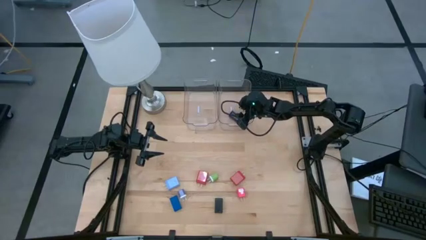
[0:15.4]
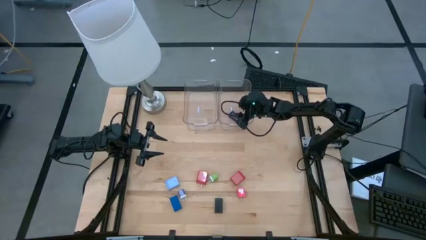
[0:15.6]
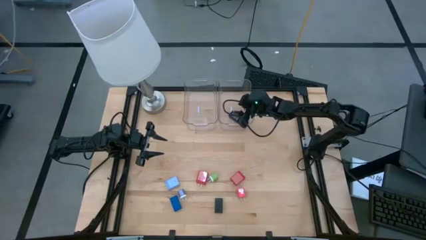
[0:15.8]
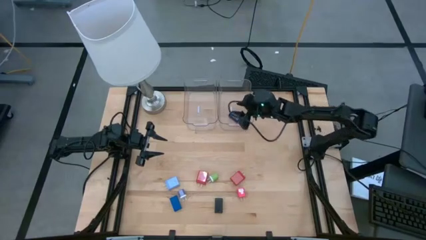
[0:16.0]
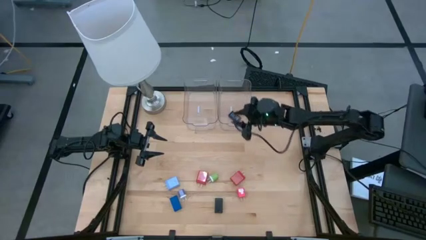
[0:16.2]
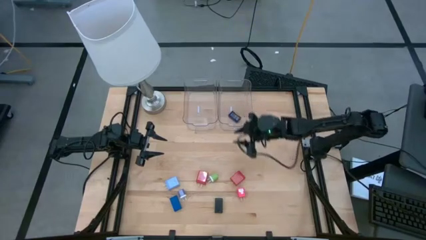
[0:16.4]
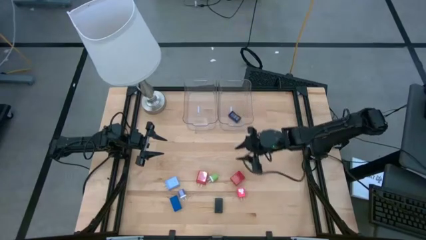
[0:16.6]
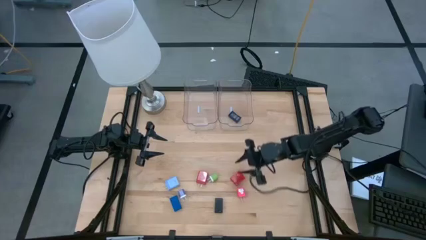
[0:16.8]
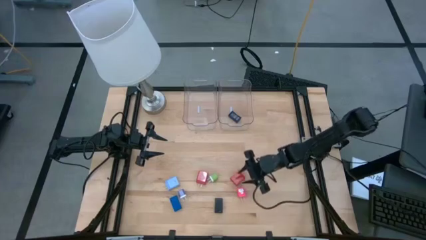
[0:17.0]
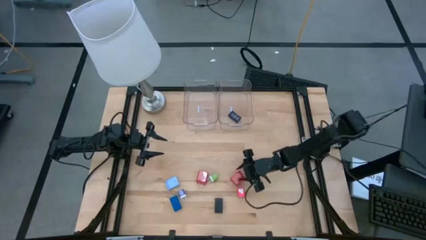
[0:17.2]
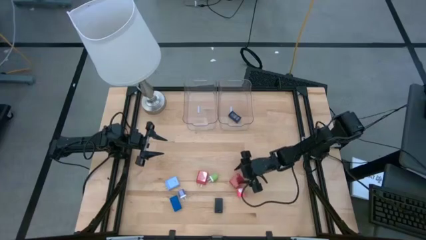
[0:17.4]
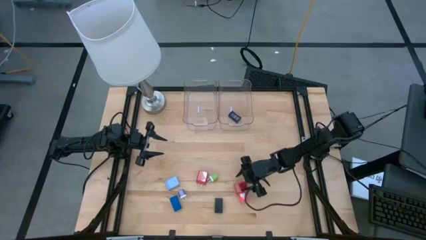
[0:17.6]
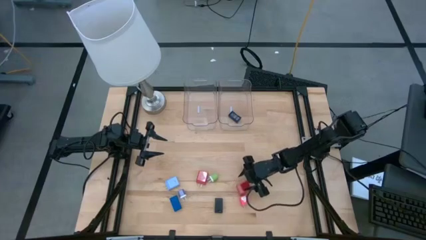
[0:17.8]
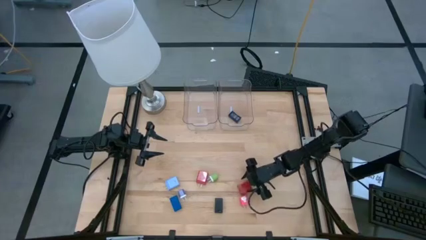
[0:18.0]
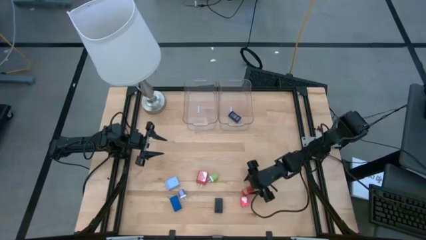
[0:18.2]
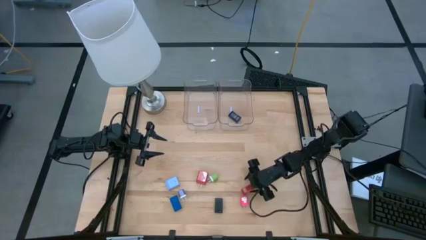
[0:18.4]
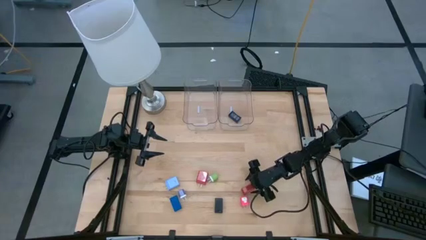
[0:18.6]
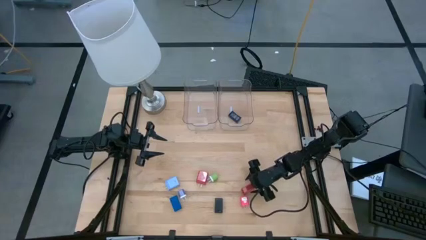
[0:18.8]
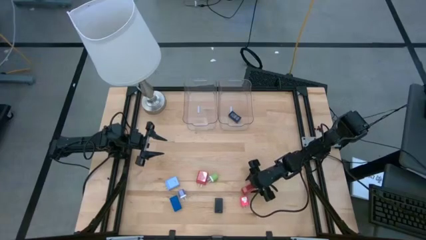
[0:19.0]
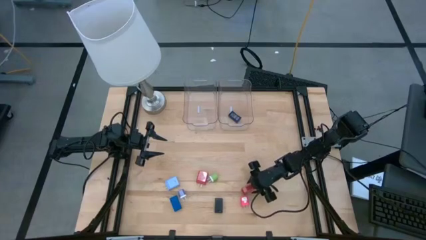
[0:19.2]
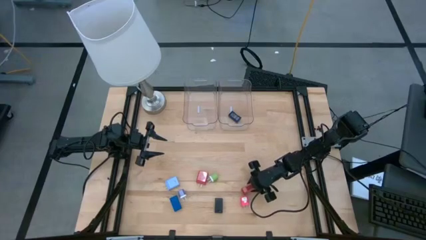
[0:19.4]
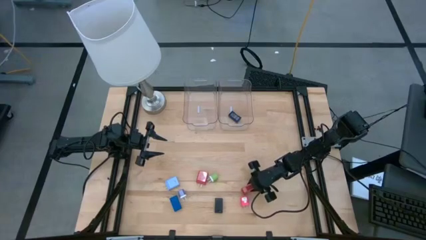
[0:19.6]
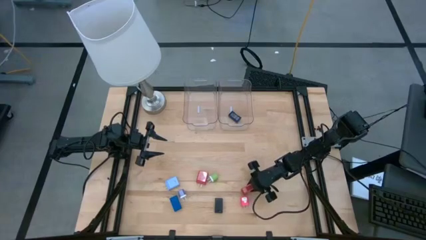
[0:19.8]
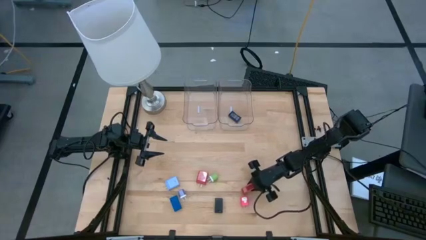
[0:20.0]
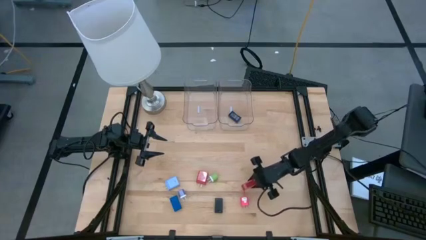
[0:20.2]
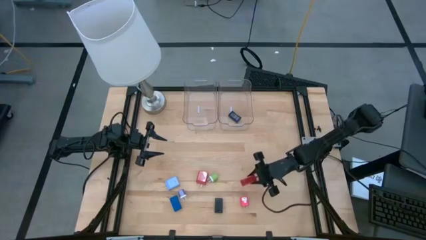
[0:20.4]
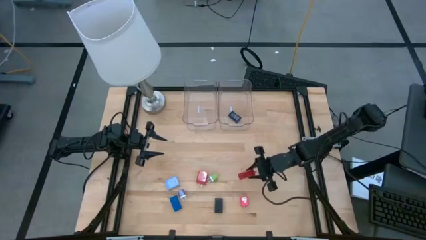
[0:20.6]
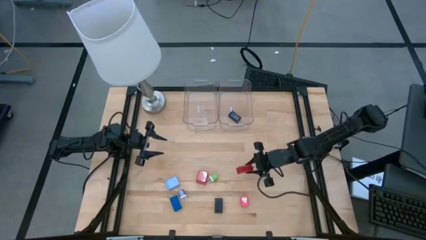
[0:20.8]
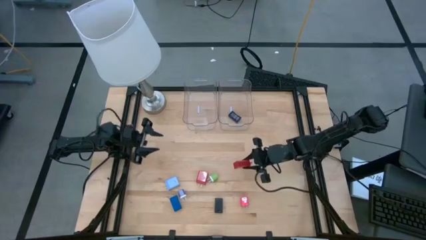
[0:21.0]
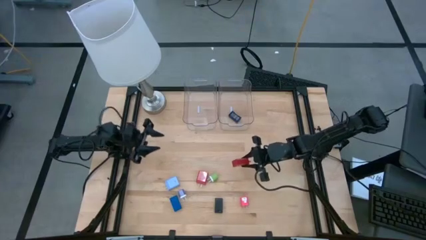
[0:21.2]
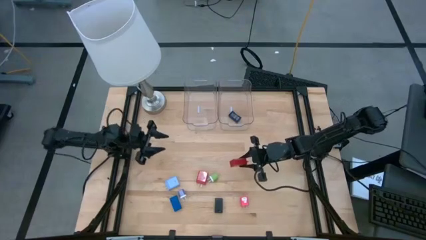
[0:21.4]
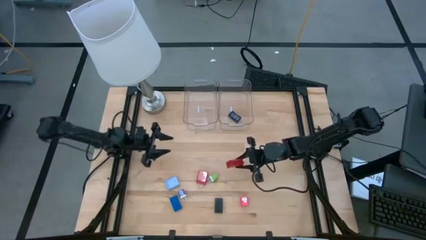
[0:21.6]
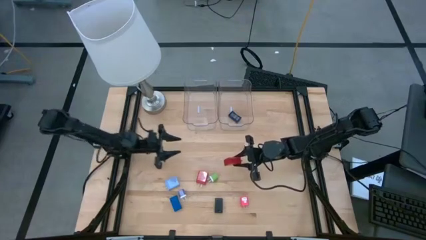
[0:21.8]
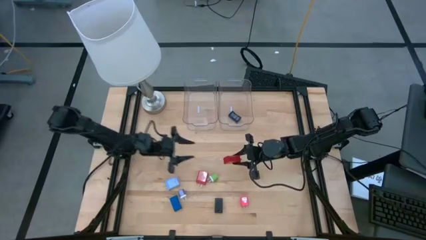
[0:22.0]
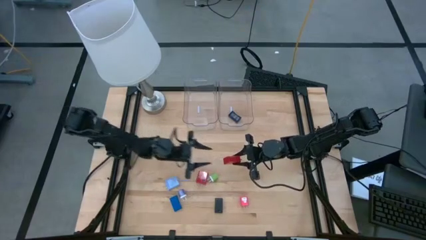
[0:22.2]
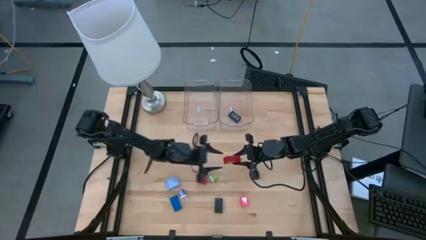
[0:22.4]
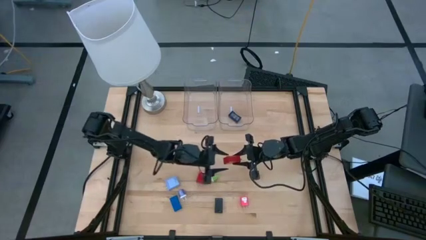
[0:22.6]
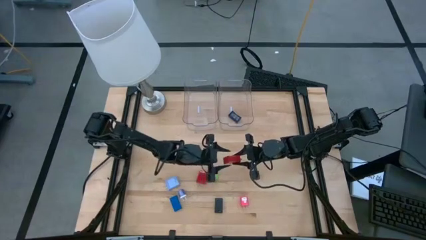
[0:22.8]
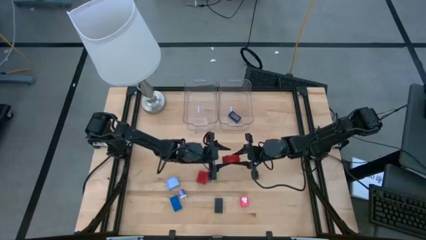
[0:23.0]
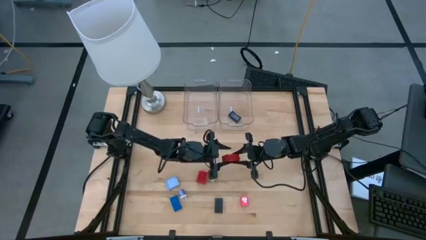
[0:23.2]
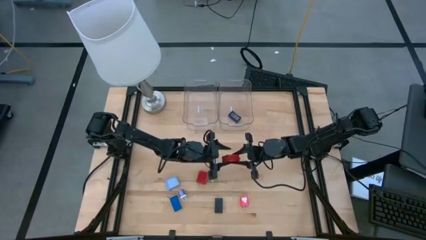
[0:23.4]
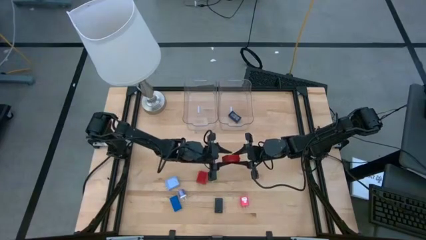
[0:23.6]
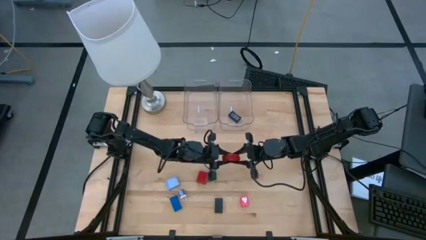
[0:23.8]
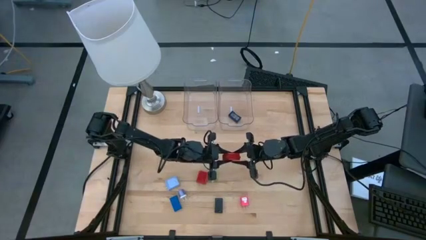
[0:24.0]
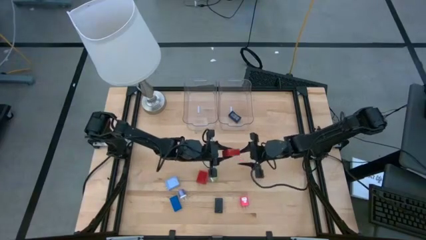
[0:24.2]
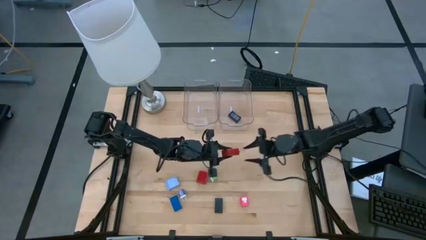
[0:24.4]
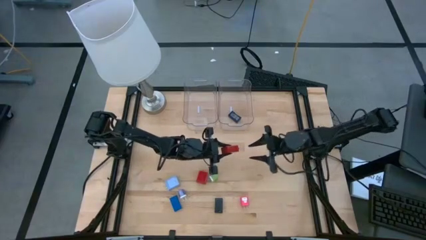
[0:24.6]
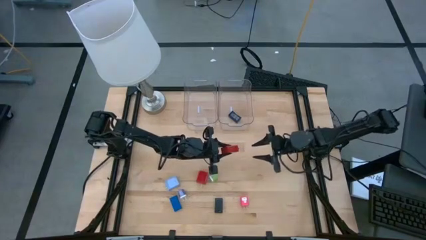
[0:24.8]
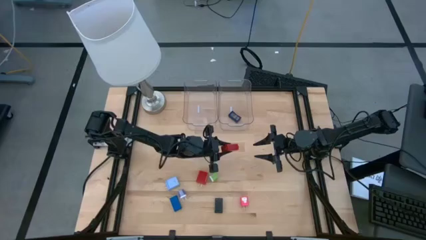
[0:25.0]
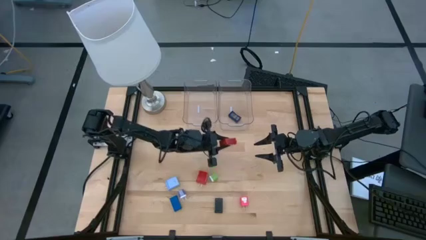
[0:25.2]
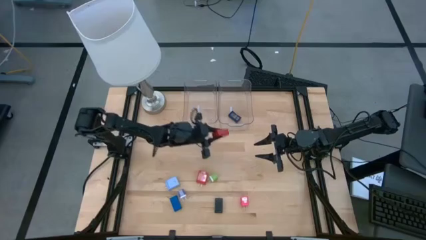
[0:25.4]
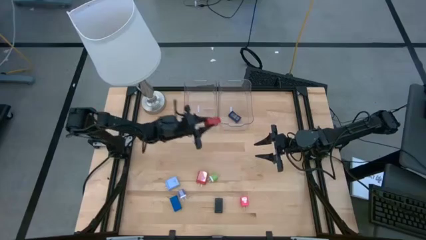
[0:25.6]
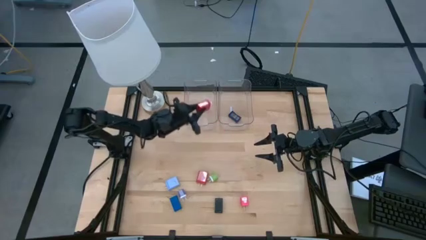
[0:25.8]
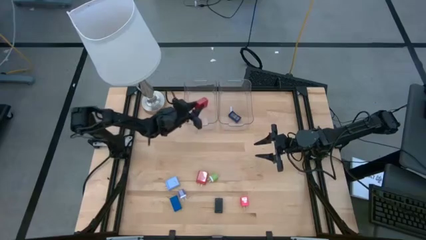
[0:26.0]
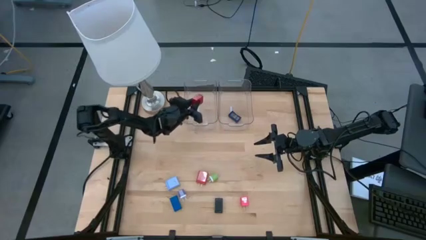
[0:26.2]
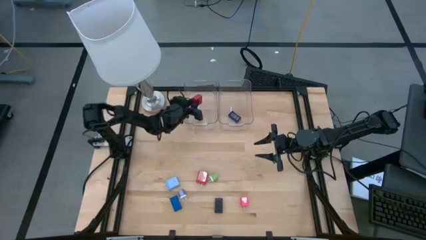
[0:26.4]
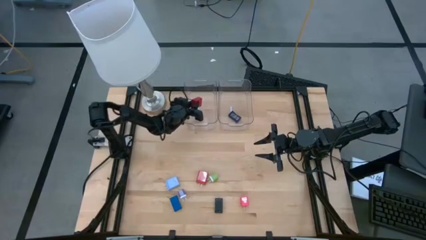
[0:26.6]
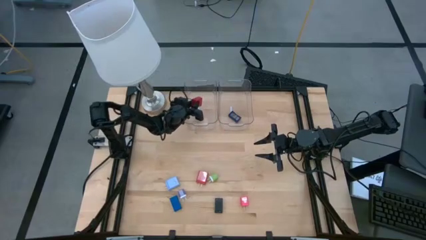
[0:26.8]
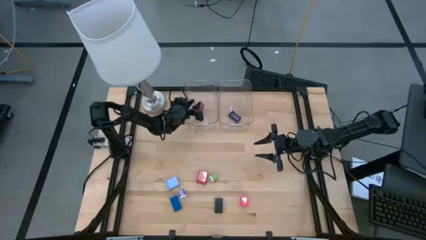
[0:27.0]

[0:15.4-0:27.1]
Task: Pick & Place Office items
Put the red charger adapter into the left transparent bin
